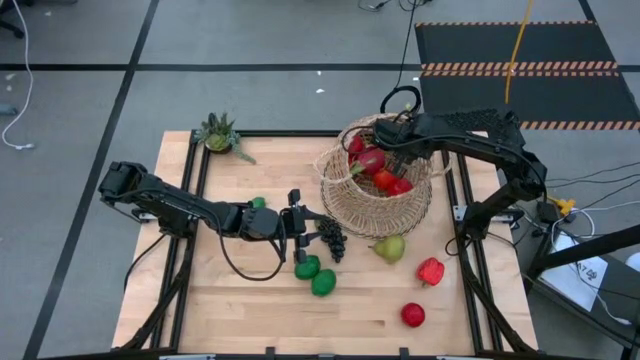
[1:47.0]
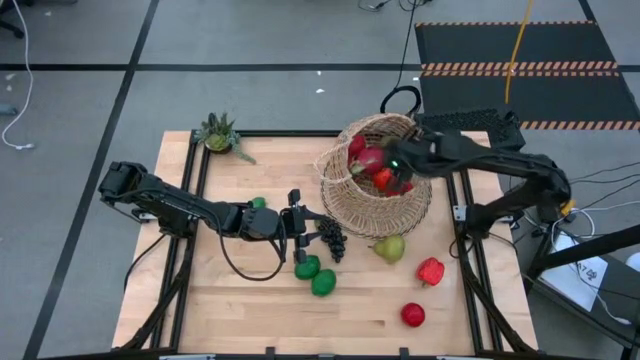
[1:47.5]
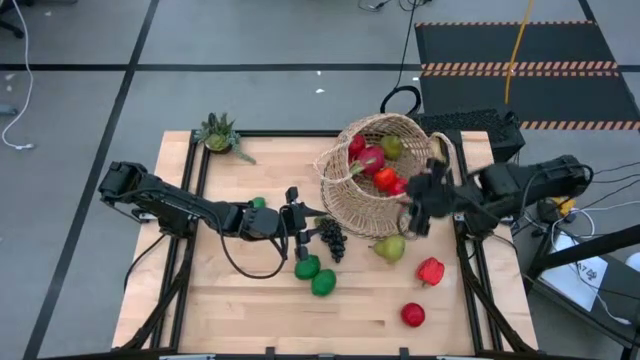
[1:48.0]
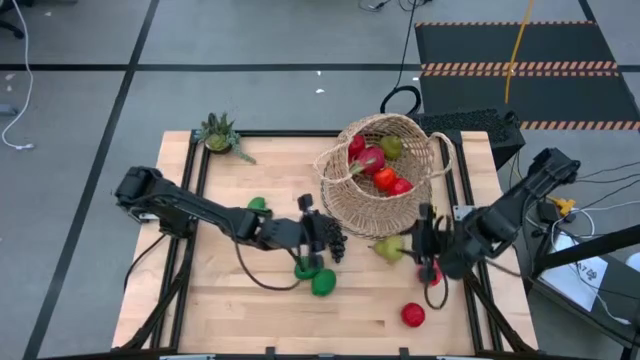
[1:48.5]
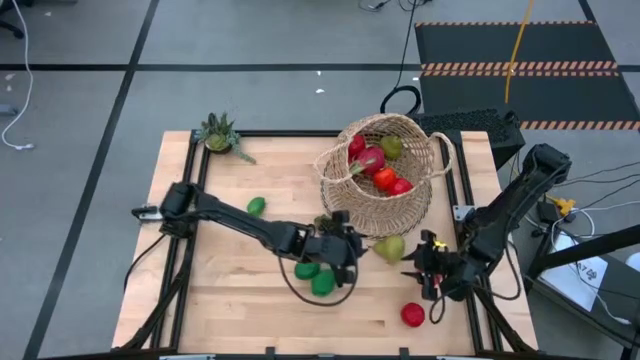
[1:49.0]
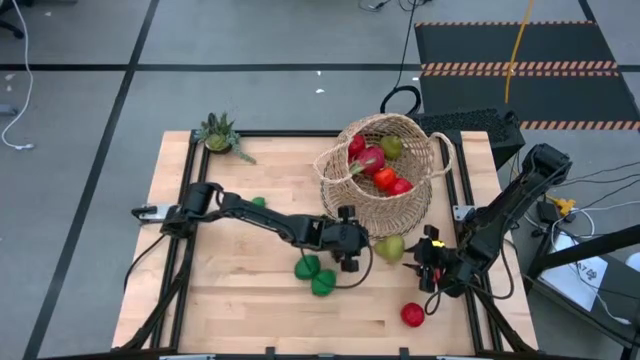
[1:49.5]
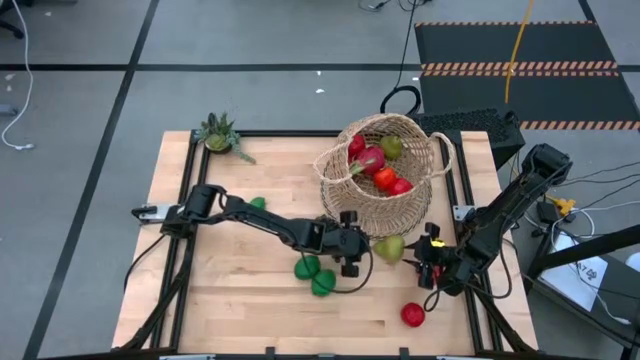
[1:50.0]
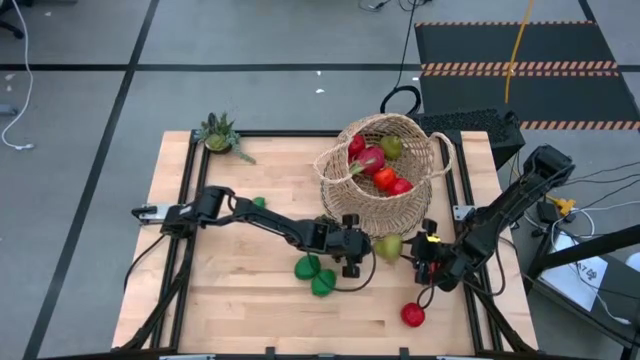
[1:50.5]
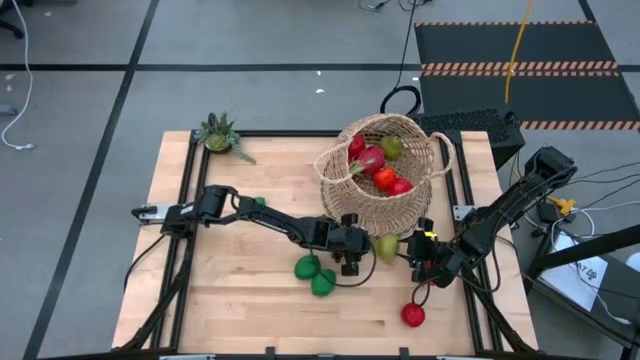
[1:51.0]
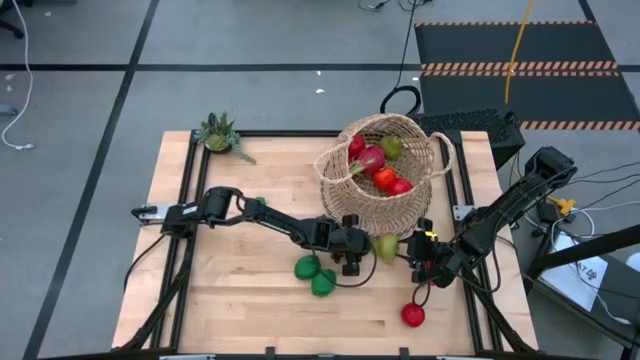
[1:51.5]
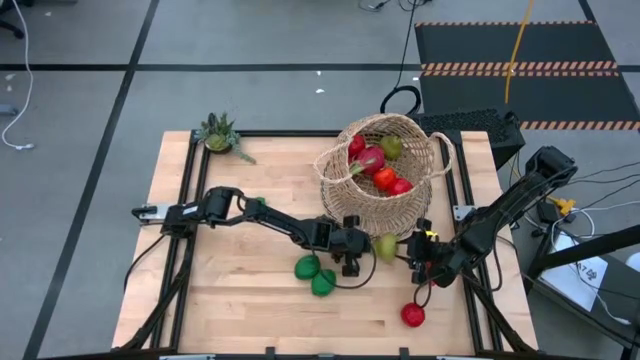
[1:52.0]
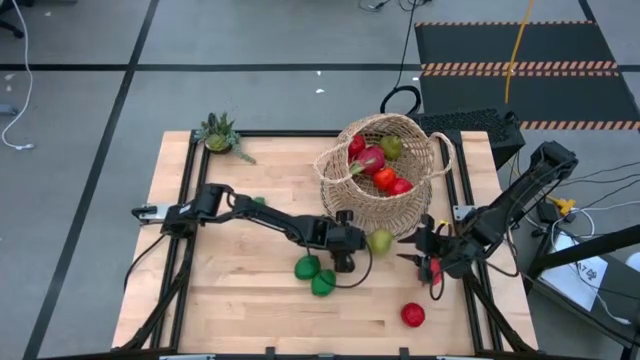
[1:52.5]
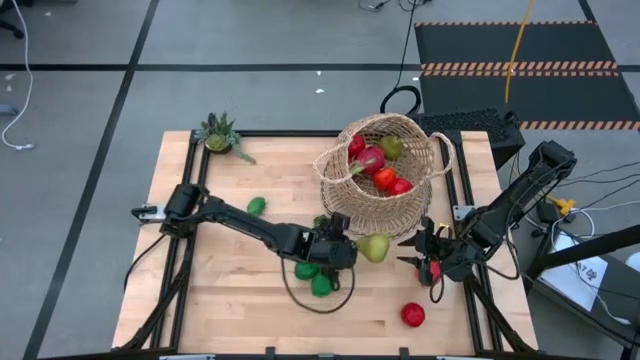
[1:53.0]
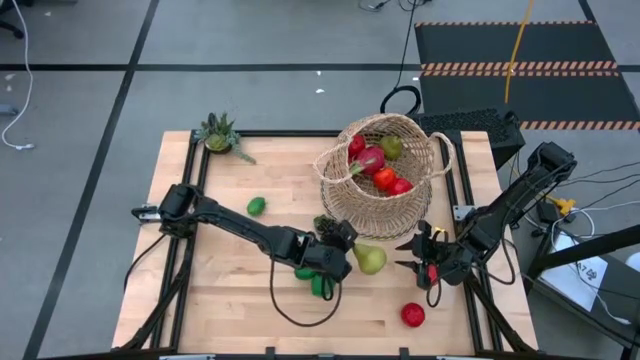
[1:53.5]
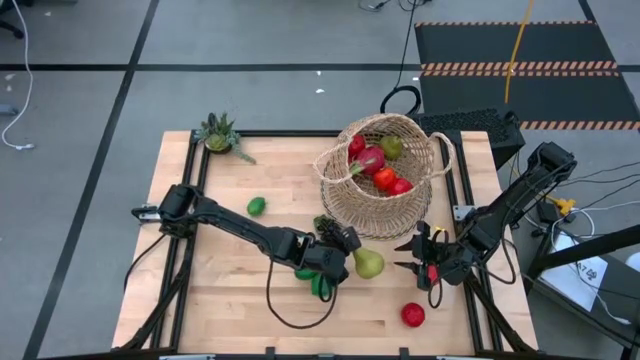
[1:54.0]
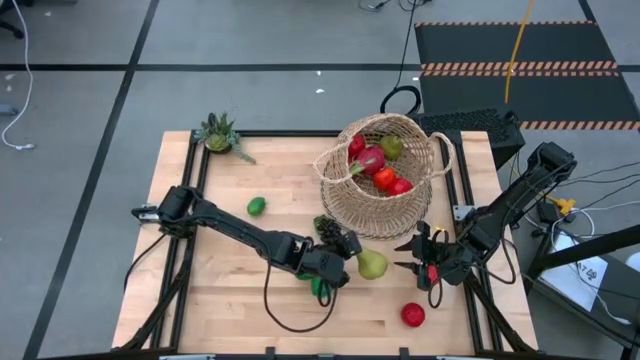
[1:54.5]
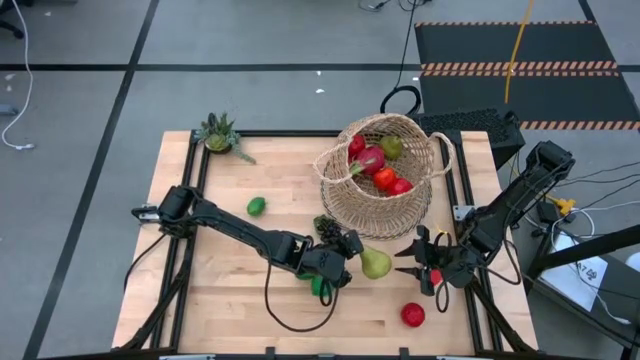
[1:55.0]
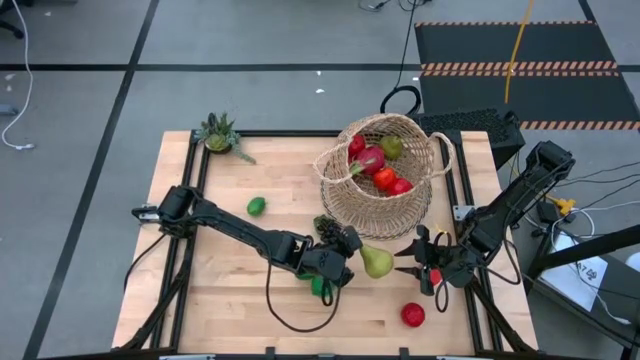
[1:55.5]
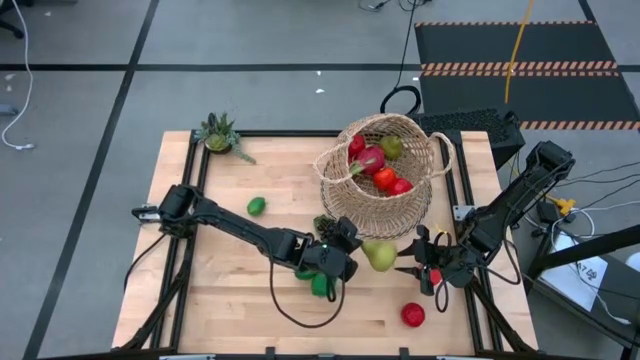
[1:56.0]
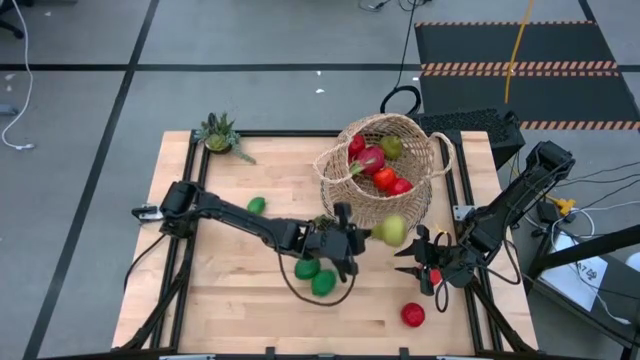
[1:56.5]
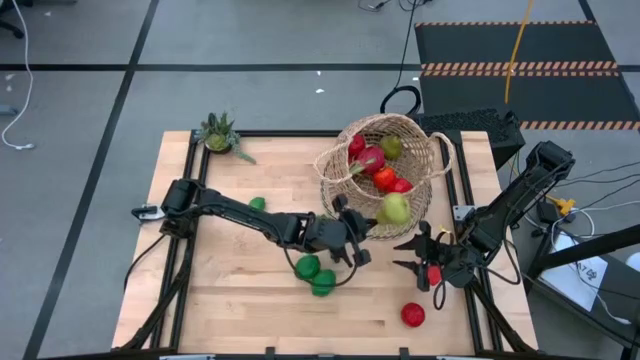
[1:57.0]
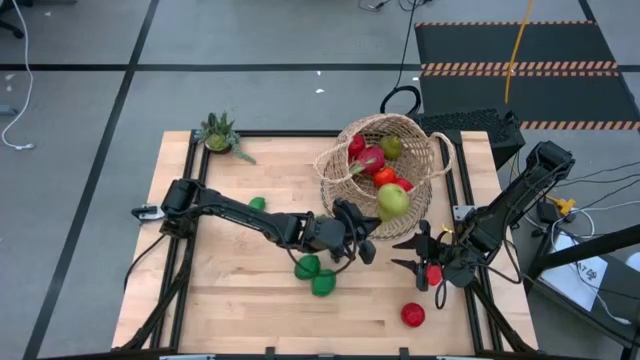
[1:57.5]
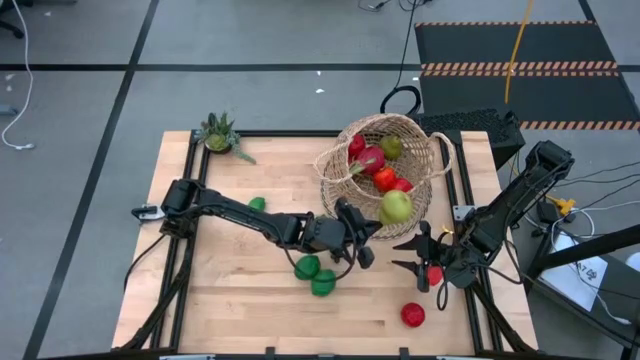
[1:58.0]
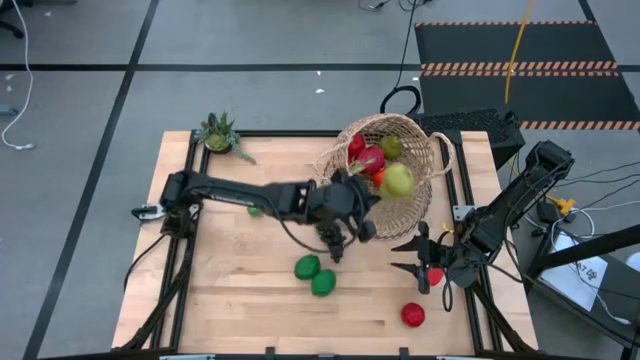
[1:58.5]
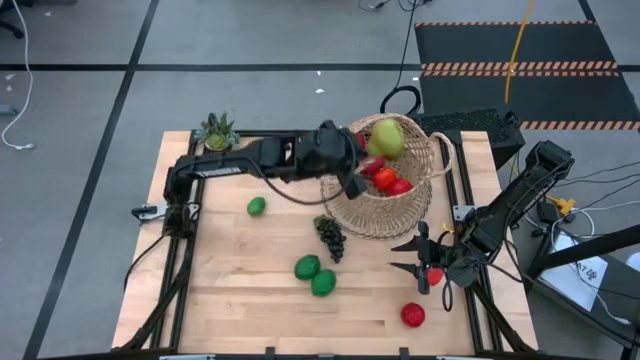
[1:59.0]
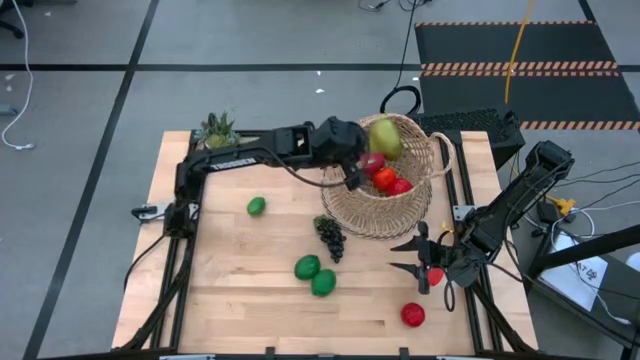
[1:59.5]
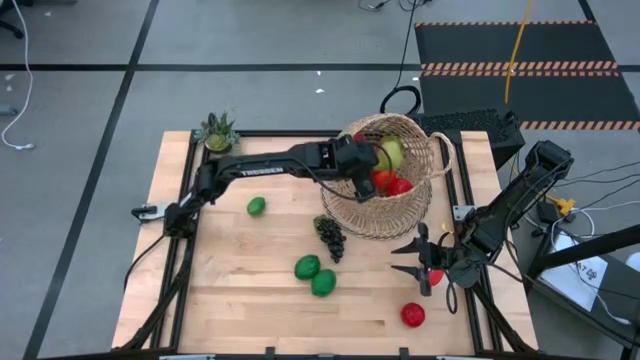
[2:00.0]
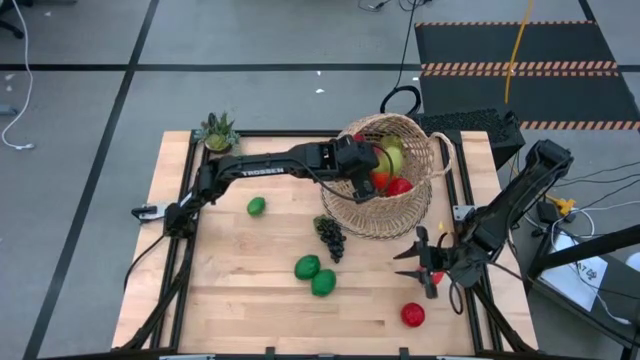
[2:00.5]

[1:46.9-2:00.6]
Task: Build produce basket
Put the green pear into the brown basket

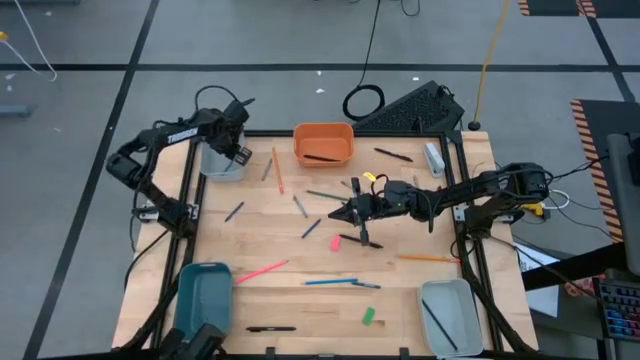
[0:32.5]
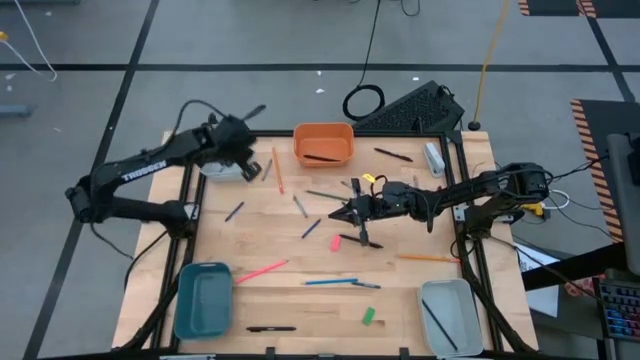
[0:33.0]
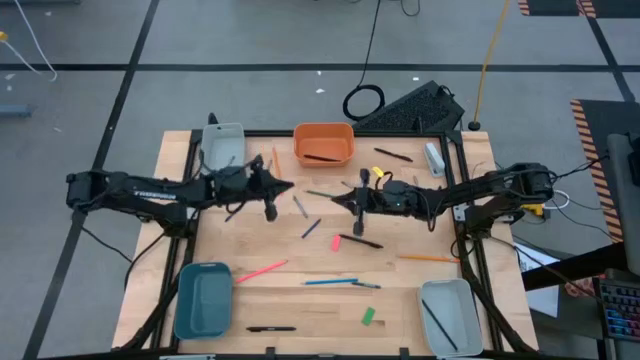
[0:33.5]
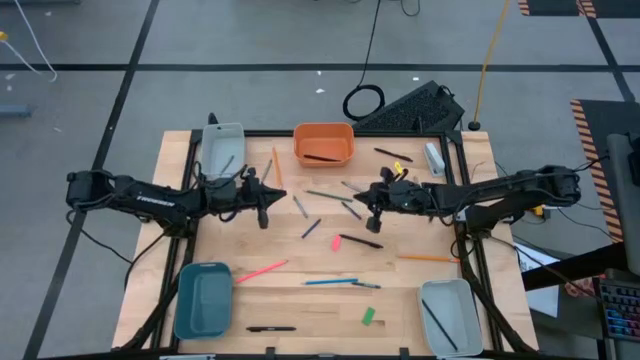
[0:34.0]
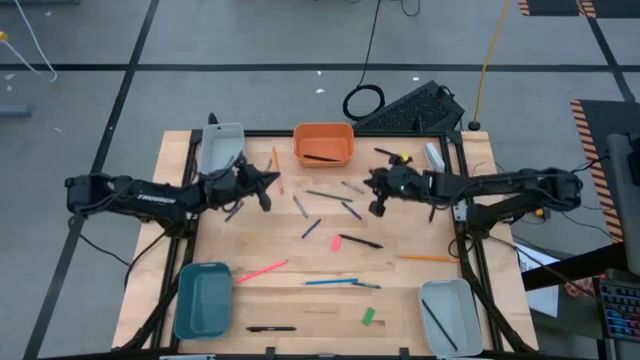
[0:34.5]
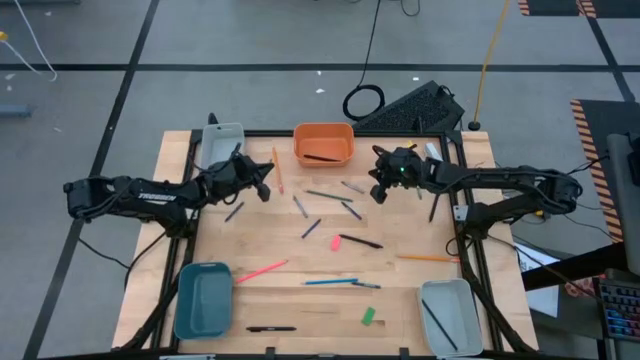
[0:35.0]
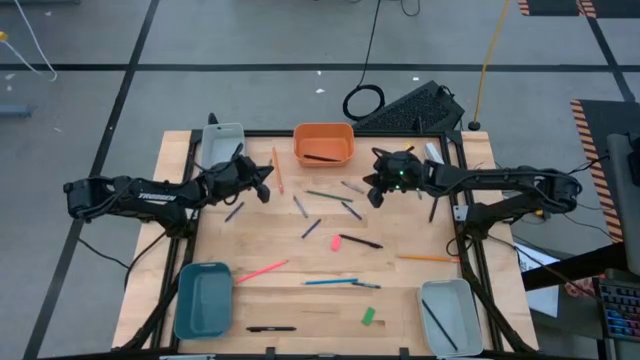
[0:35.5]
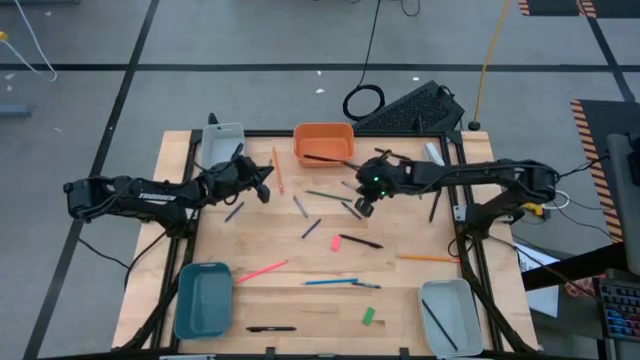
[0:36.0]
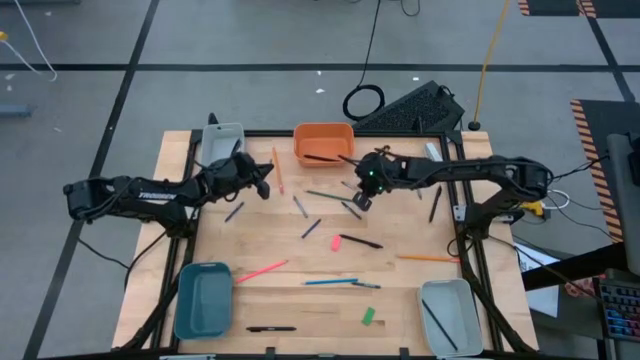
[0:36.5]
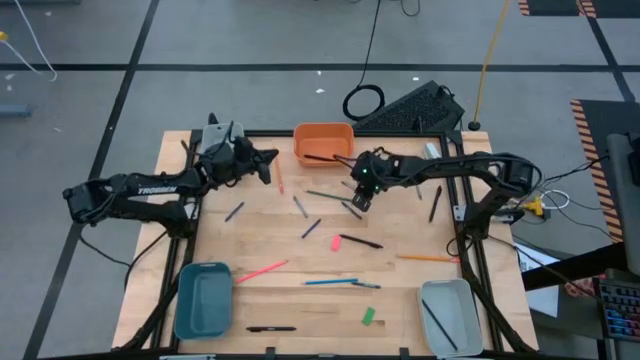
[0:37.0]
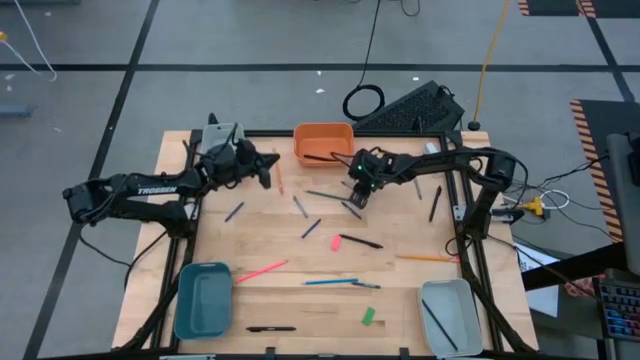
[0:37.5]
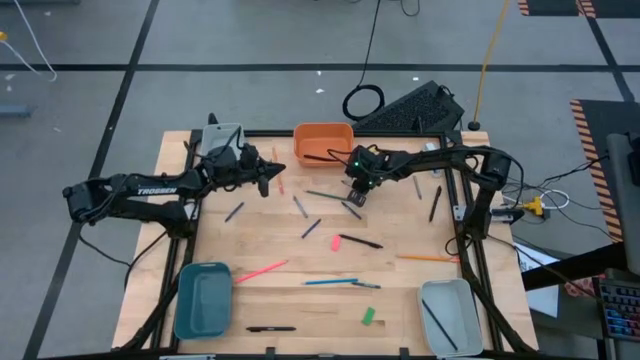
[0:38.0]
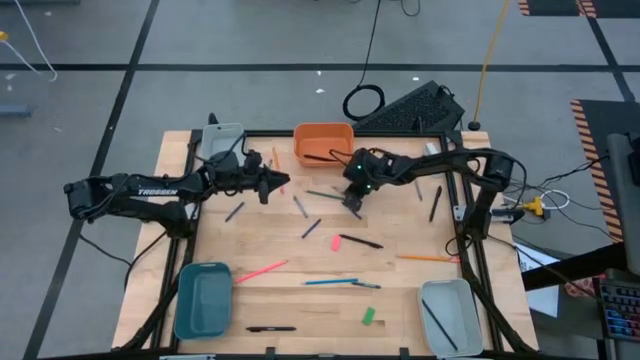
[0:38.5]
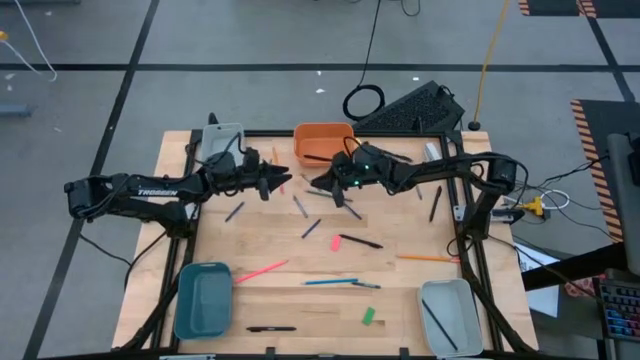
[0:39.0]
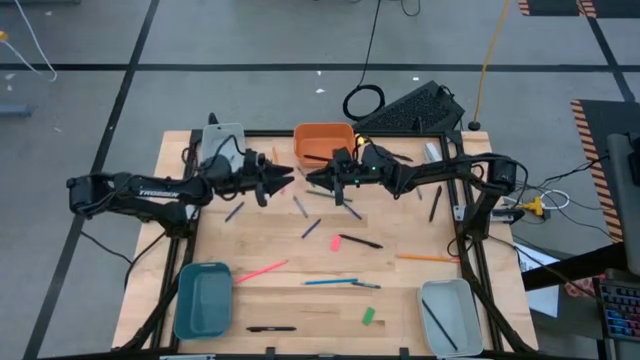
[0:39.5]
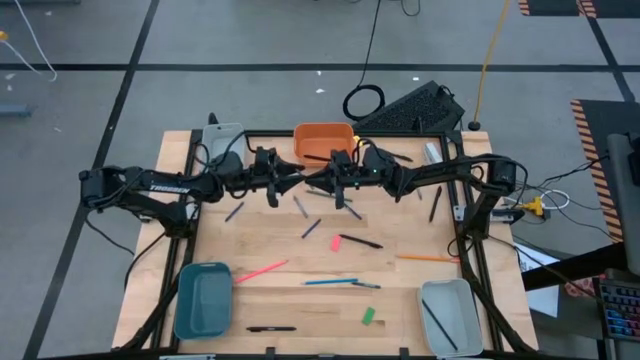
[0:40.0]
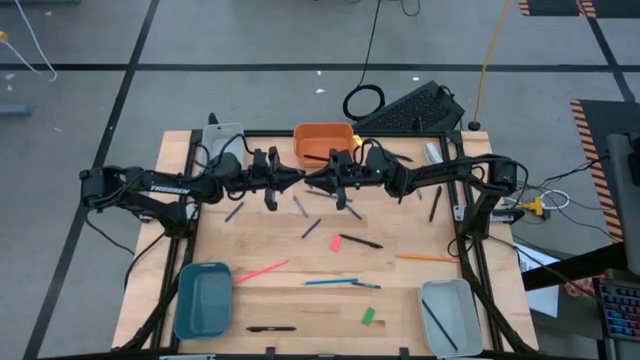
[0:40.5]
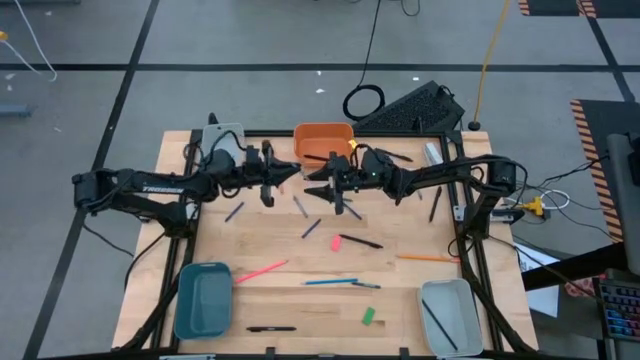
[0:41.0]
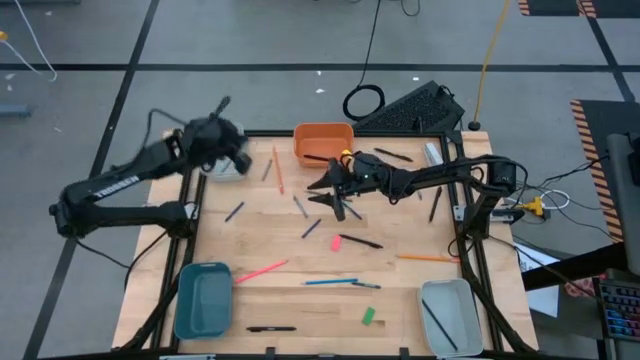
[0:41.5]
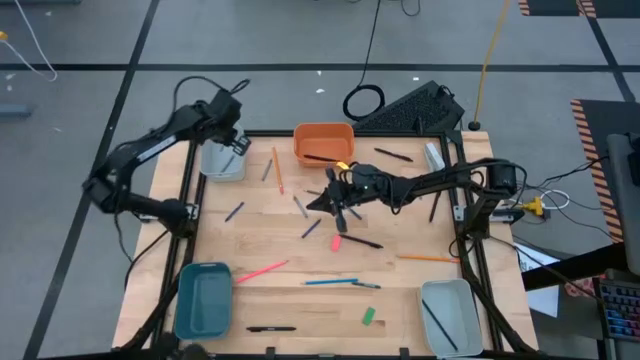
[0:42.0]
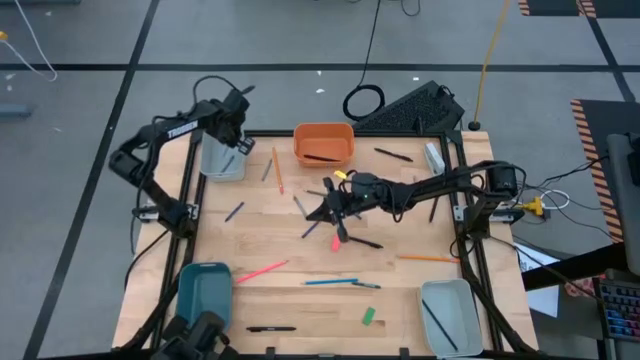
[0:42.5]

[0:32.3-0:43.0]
Task: Sort crayons/erasers/pens/pencils in bins
Put the gray crayon into the top gray bin
